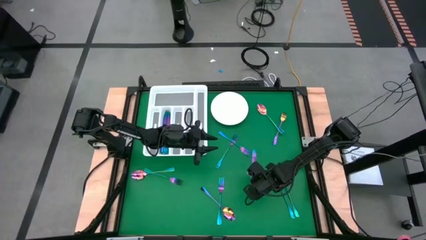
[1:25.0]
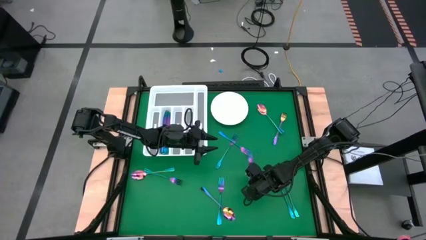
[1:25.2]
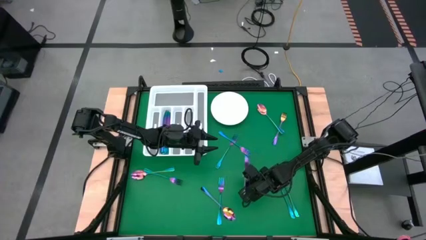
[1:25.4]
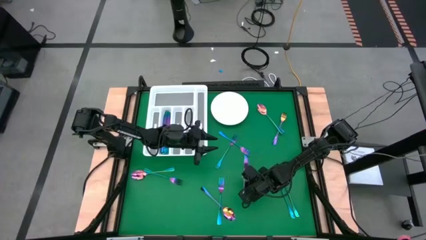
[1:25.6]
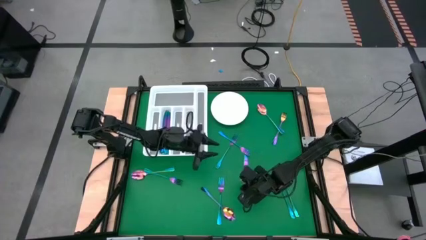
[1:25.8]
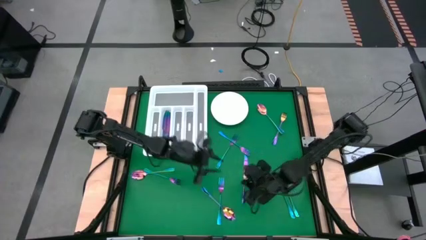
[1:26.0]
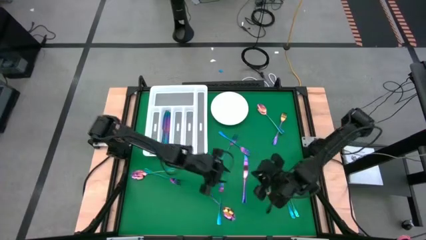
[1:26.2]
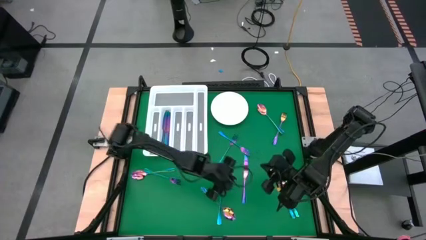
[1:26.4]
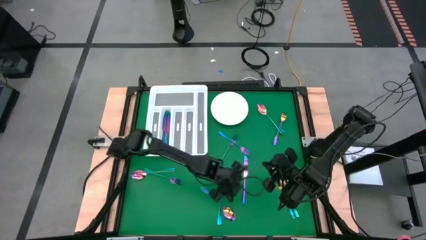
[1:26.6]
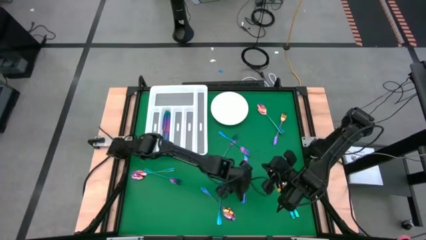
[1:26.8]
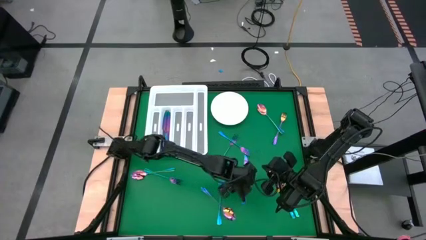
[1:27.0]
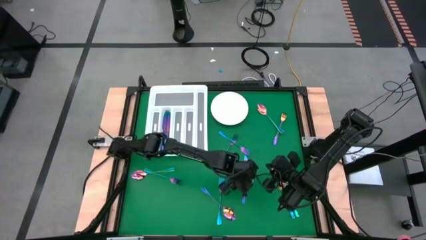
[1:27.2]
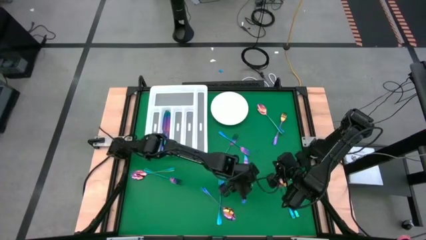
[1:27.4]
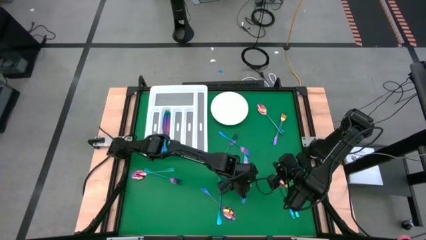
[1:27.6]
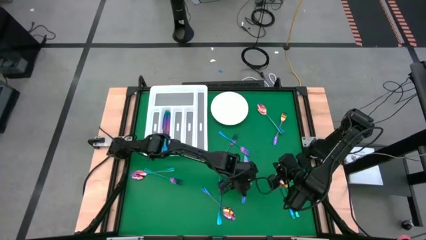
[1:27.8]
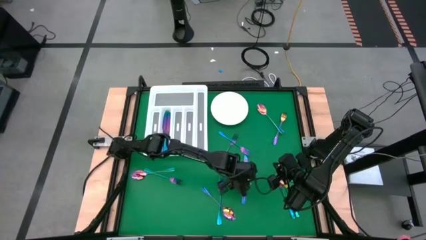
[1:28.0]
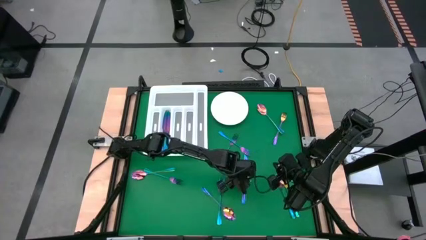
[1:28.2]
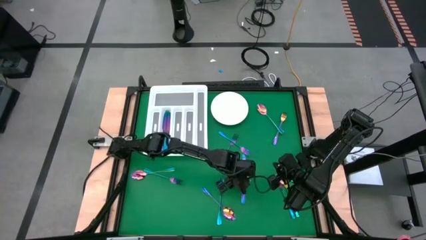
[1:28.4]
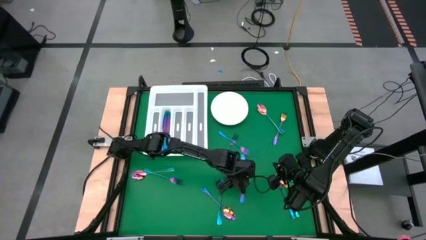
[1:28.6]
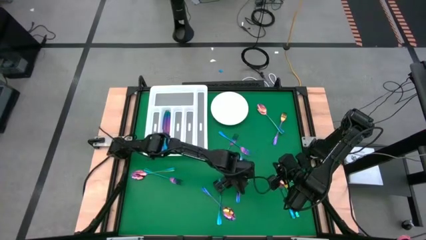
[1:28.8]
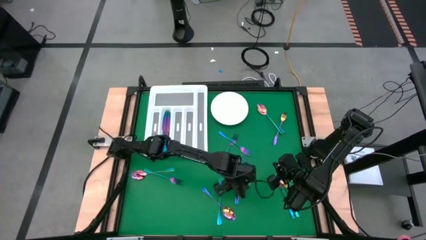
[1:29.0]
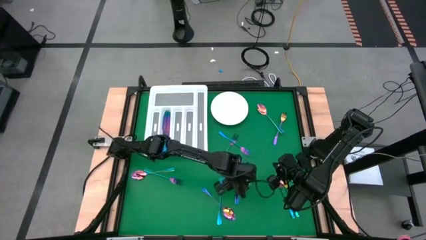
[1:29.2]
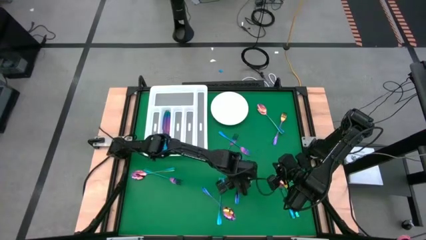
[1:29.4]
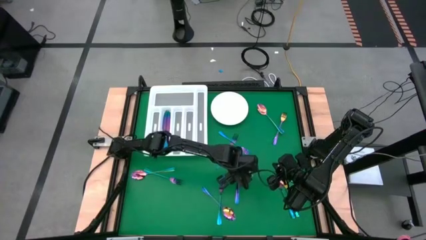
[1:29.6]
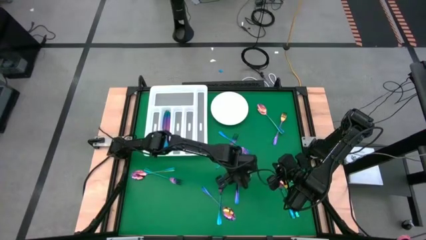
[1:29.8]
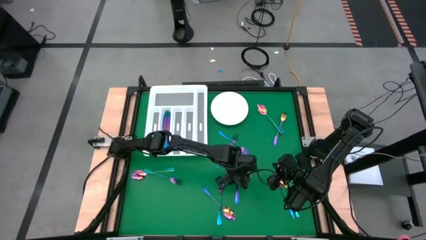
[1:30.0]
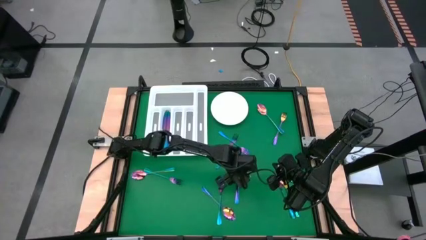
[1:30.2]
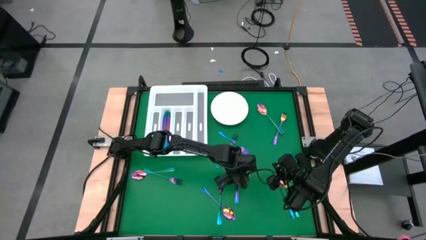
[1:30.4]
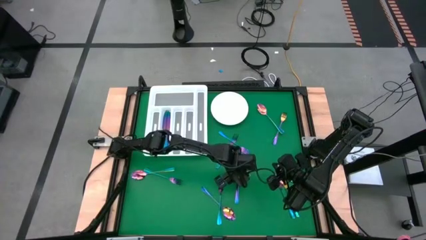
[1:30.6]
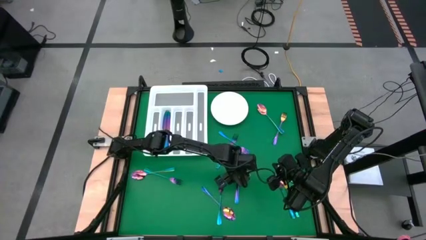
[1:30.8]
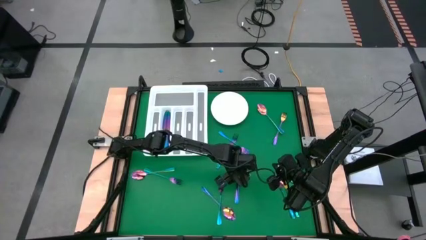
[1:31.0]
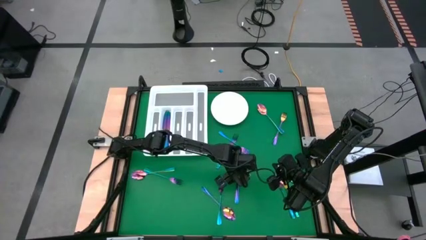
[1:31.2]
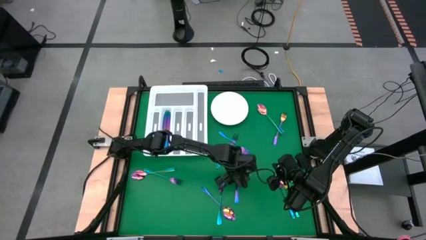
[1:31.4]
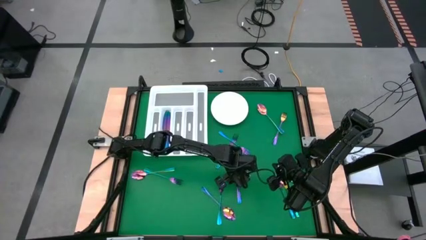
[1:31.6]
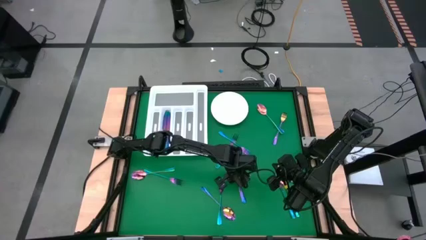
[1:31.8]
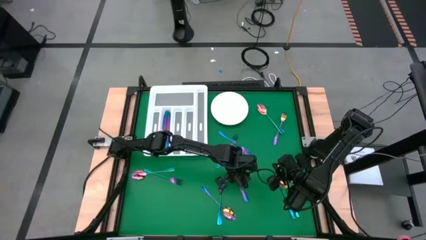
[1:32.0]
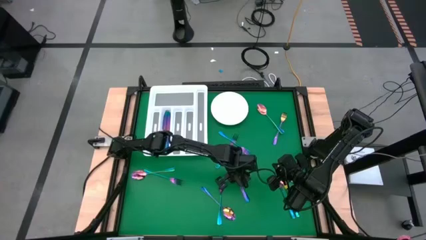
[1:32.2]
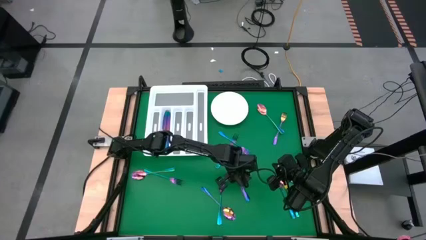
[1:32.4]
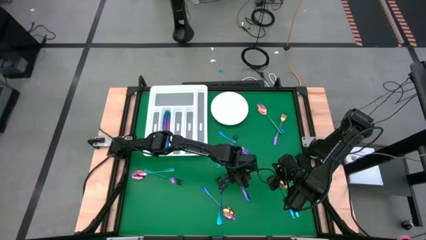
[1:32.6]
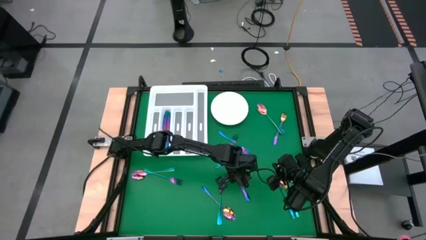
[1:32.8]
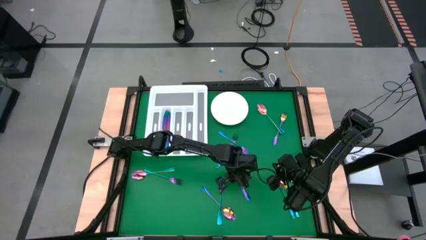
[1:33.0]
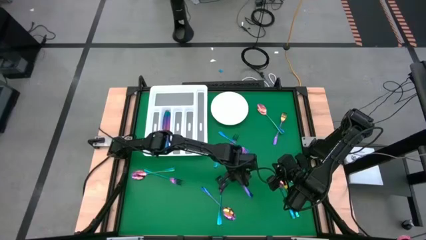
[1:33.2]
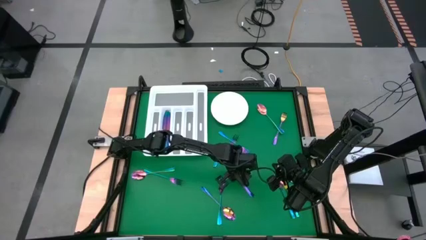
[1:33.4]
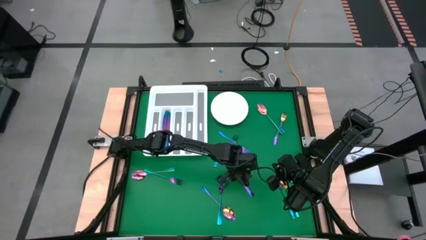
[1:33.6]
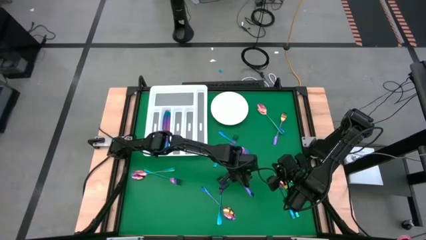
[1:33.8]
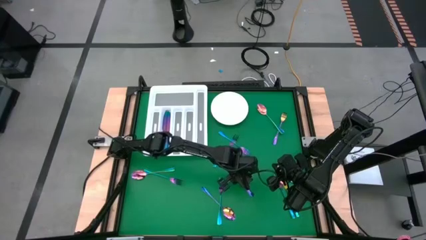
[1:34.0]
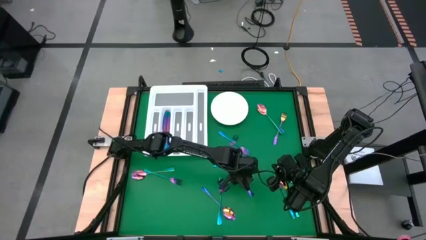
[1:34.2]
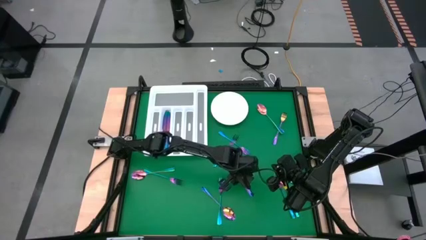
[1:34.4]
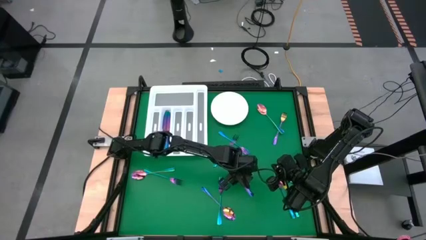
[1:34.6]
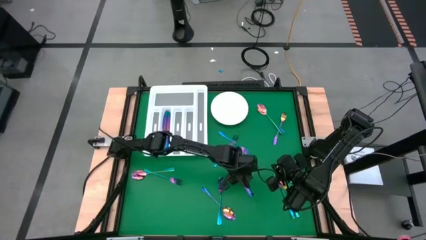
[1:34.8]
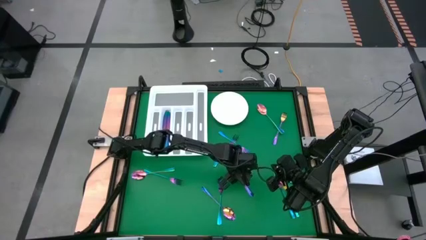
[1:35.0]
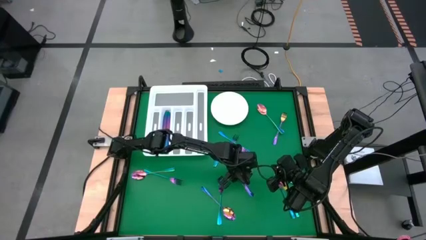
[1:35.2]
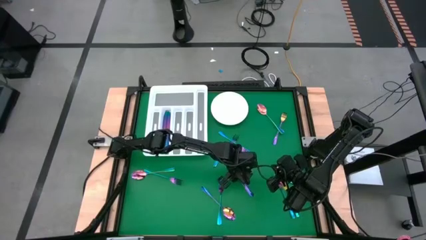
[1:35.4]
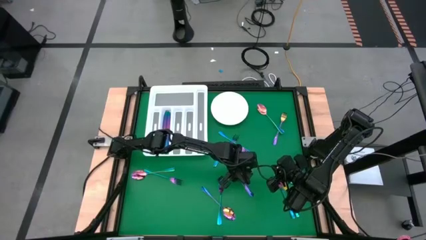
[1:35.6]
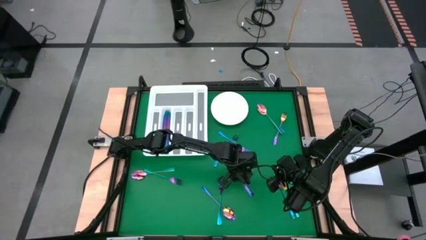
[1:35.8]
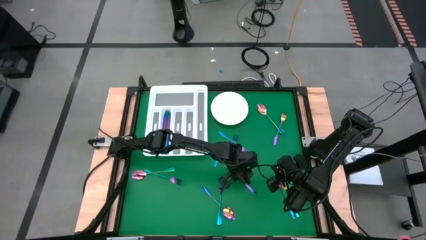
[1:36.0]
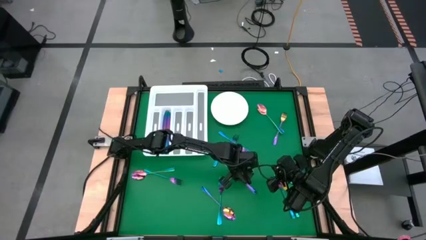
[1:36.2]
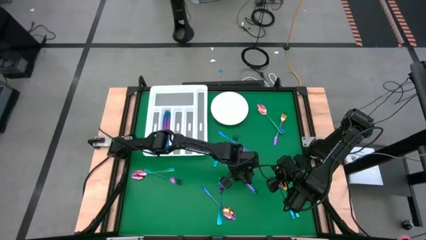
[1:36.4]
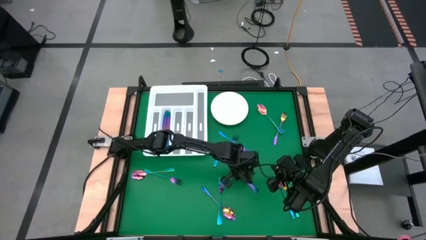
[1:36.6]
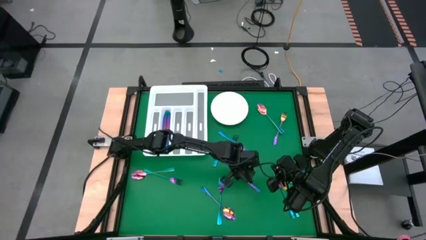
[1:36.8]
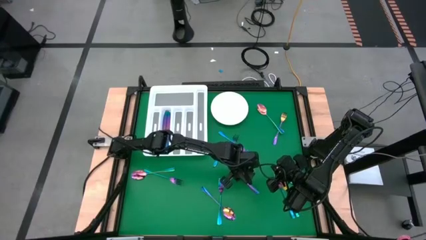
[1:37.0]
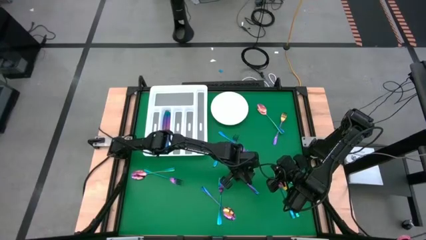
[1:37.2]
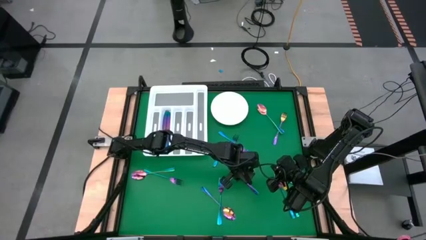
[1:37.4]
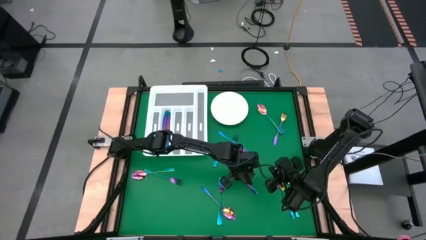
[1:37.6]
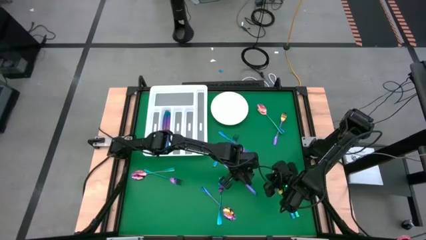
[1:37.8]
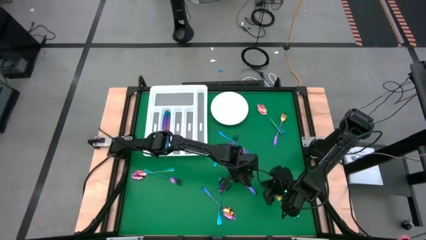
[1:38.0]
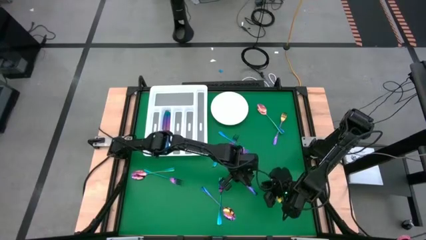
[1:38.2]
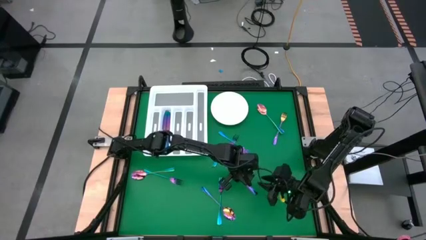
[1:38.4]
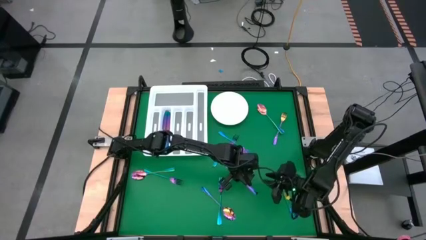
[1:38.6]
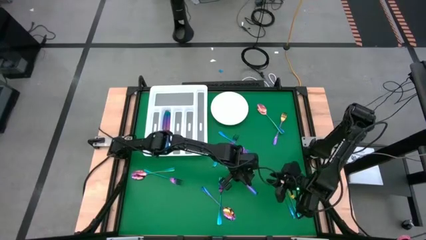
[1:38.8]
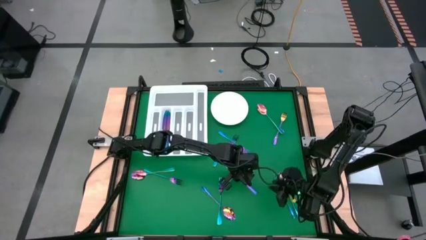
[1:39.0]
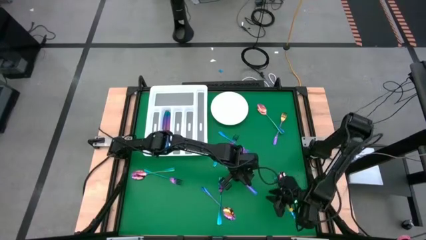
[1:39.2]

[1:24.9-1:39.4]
Task: Sort silverware
Put the blue knife into the silverware tray
